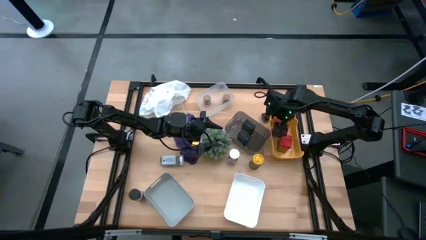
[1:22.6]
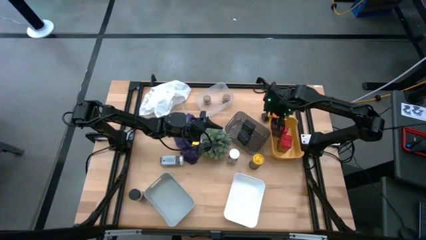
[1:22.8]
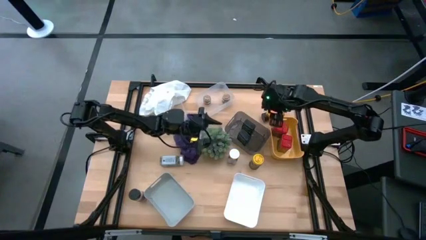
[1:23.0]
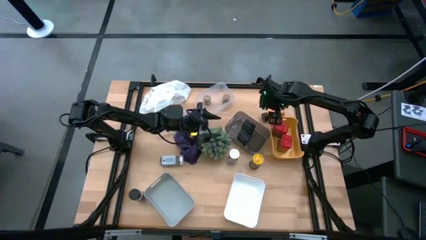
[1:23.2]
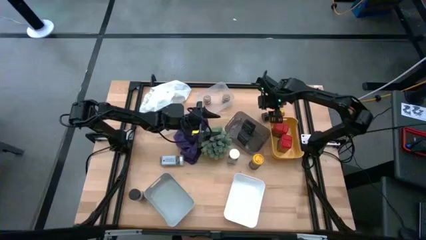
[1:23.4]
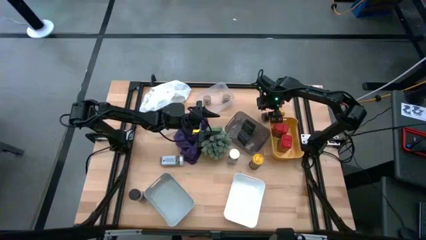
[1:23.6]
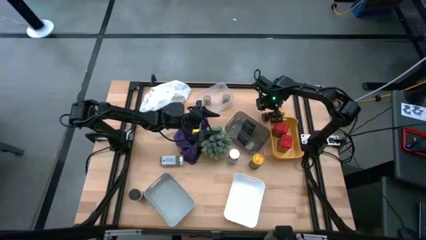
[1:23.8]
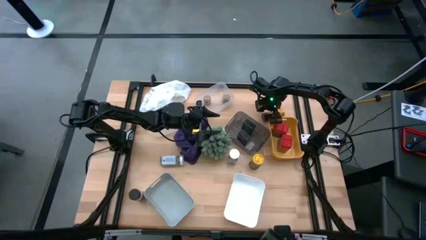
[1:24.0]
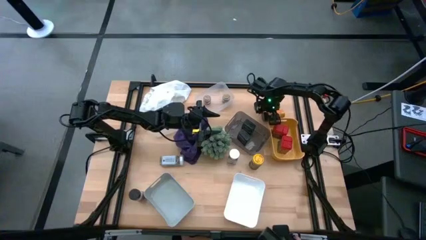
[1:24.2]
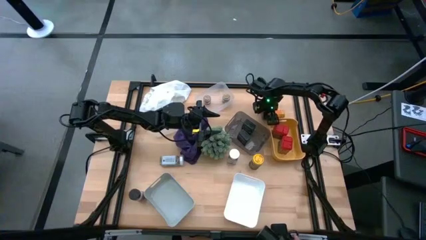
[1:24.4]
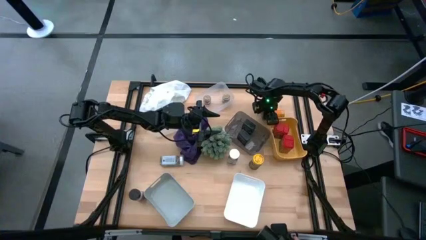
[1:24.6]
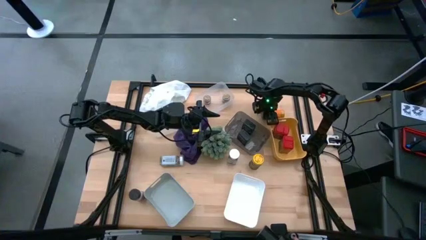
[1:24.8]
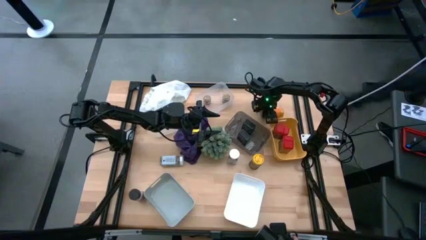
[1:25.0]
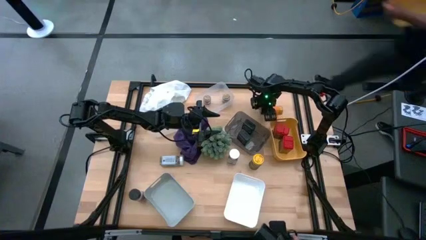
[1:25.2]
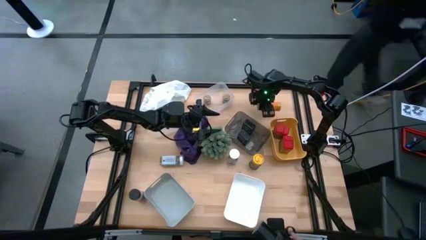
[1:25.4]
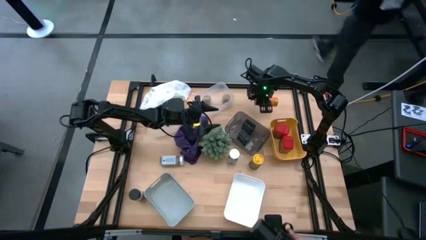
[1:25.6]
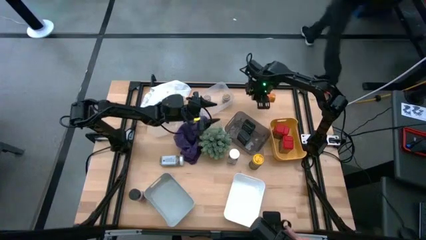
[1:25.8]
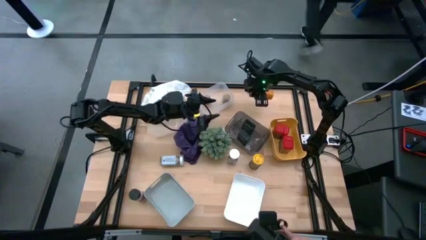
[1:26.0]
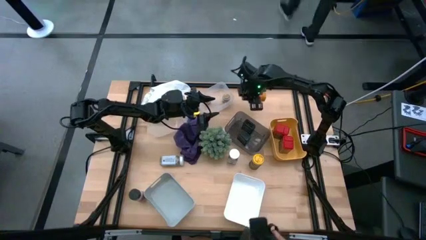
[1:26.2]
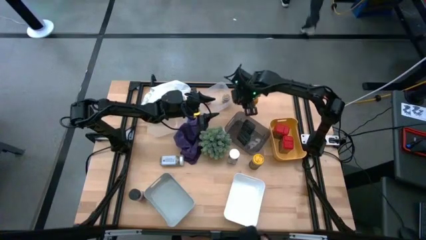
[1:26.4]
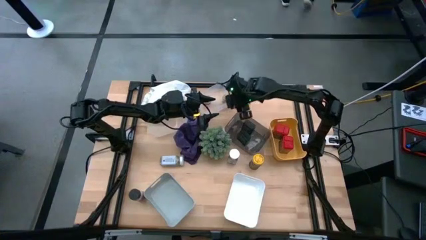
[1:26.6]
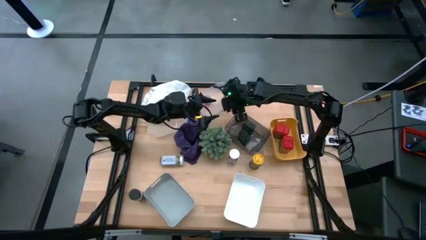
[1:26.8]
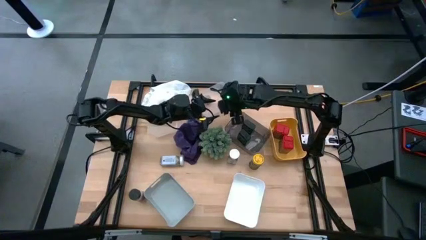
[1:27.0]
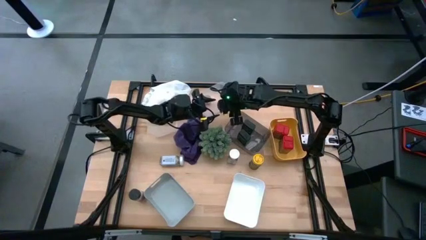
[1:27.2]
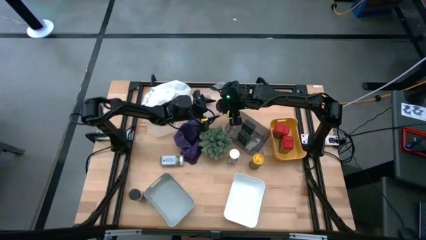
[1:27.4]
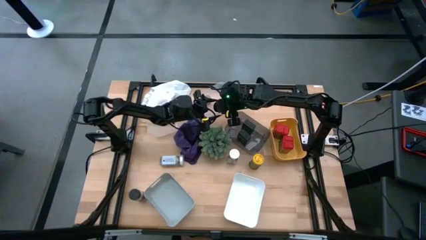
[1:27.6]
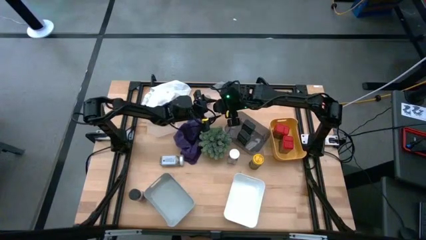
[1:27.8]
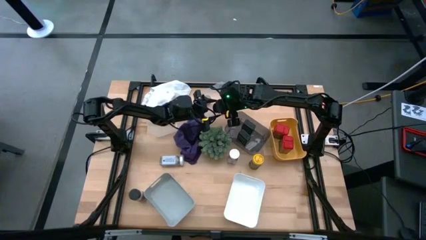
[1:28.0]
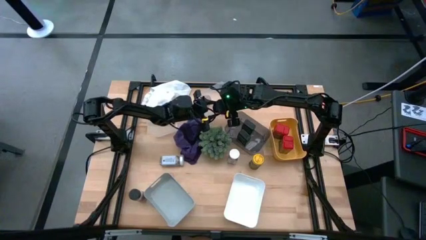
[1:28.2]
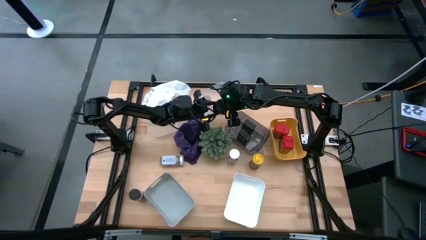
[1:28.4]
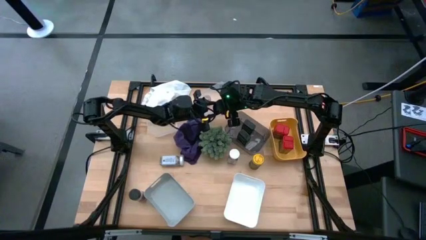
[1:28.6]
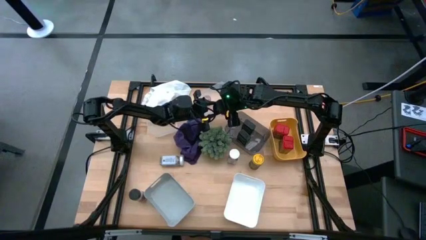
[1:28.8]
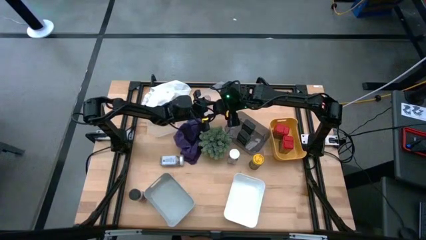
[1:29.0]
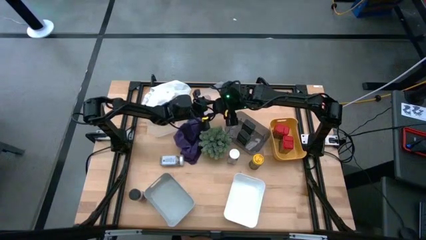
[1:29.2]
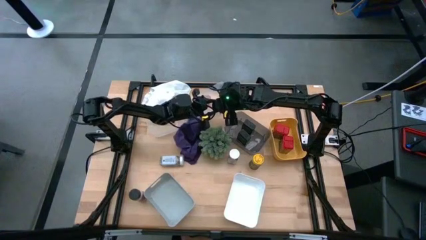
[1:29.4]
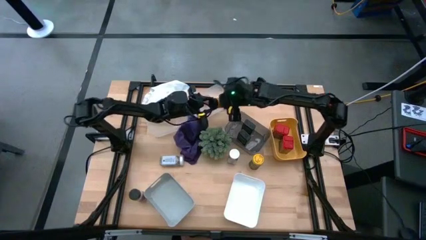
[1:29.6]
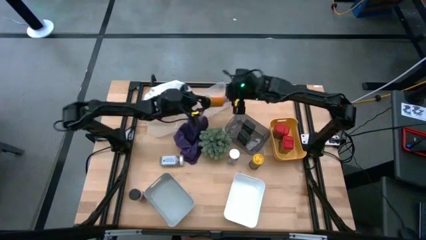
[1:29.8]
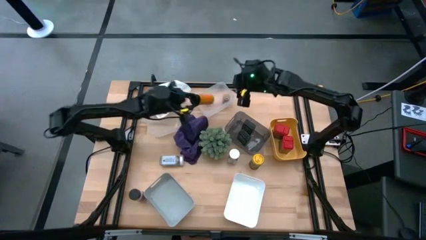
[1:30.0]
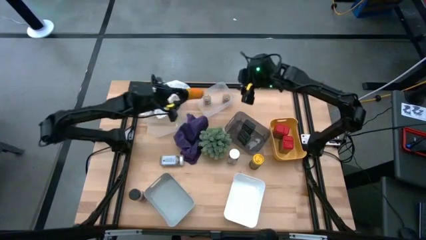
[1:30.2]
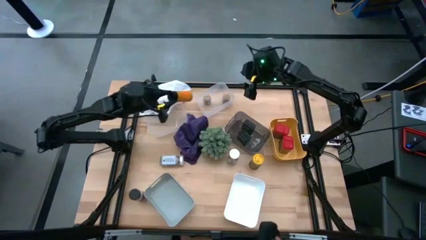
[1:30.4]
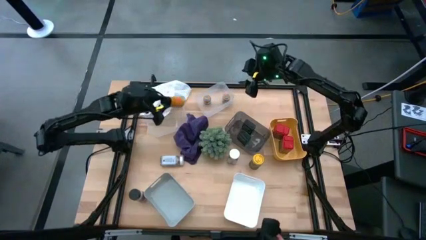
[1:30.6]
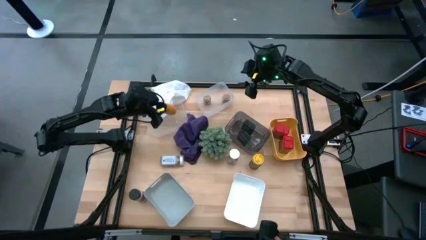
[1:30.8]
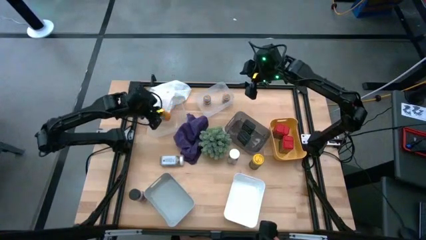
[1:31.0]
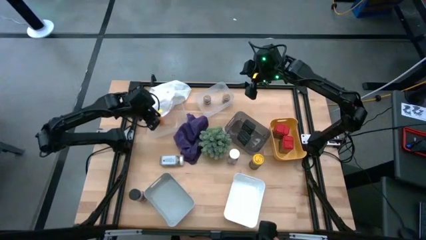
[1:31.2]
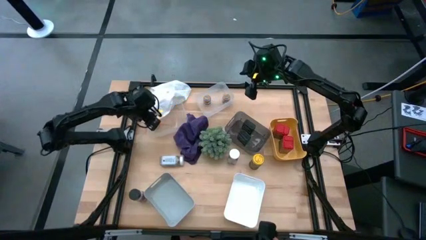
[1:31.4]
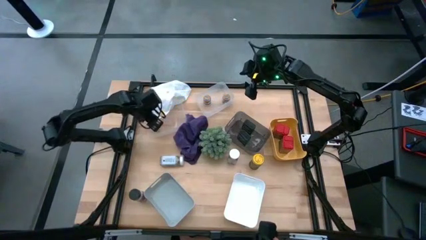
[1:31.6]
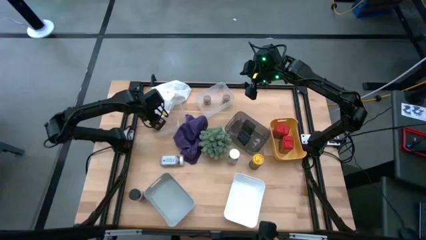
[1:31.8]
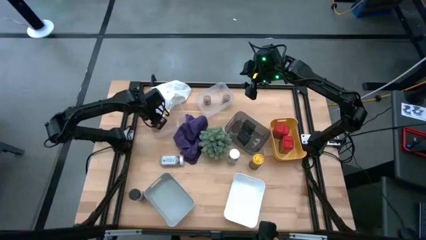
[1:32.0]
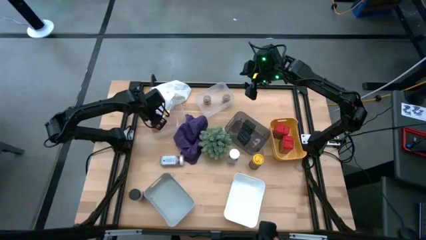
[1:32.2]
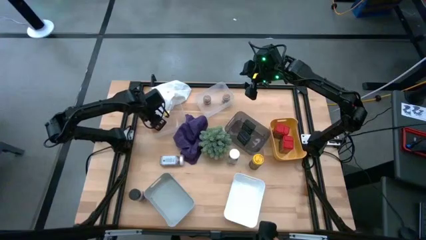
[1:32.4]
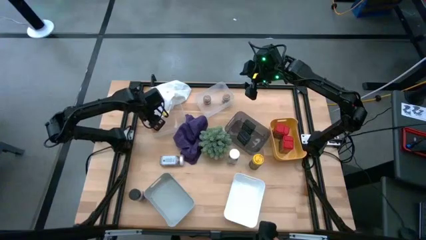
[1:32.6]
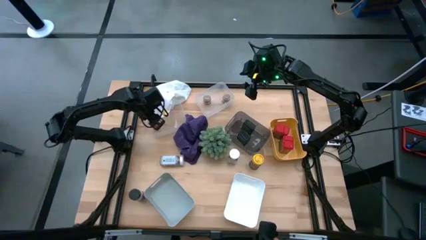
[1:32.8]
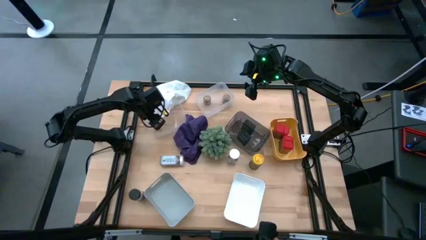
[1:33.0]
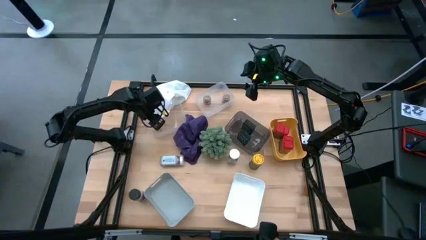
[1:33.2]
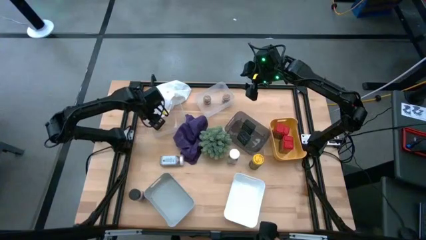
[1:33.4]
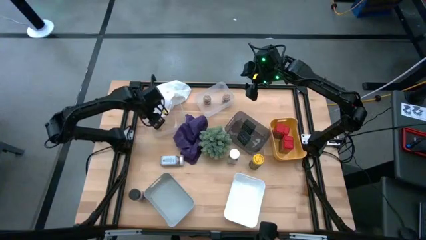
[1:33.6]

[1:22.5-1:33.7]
Task: Sort spices by type
Put the top black seasoning bottle into the left transparent bin

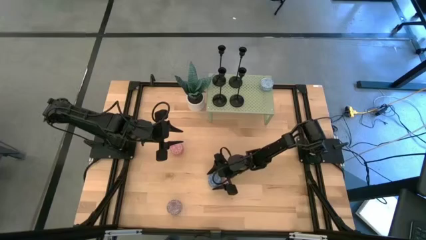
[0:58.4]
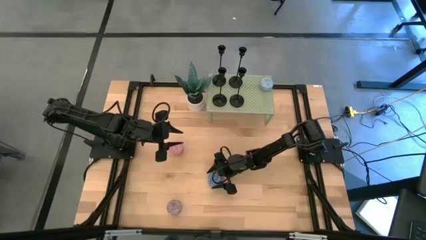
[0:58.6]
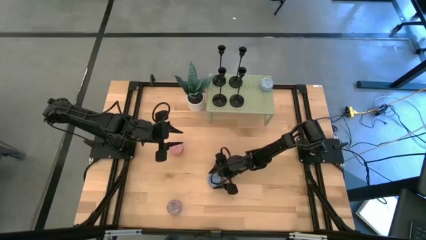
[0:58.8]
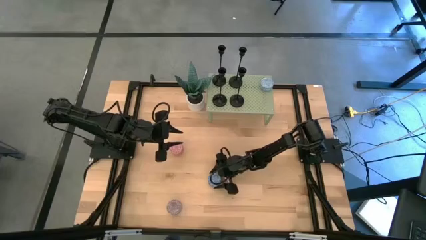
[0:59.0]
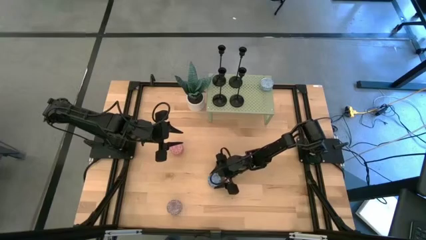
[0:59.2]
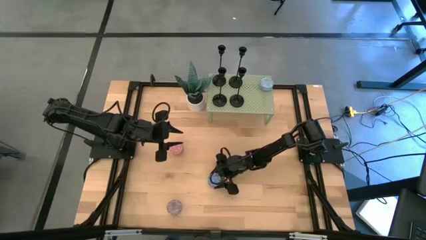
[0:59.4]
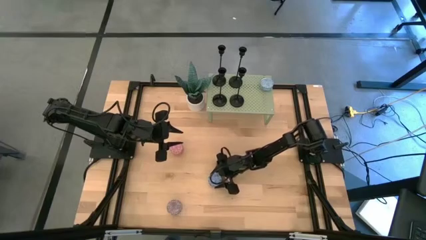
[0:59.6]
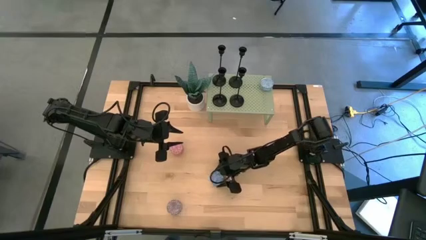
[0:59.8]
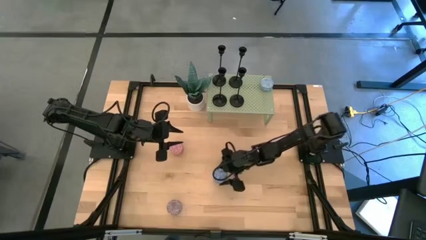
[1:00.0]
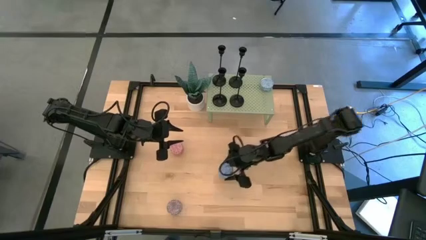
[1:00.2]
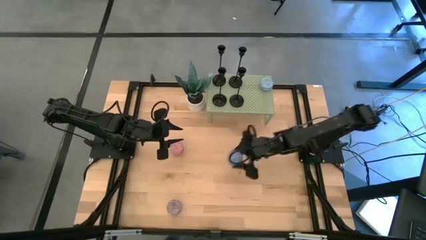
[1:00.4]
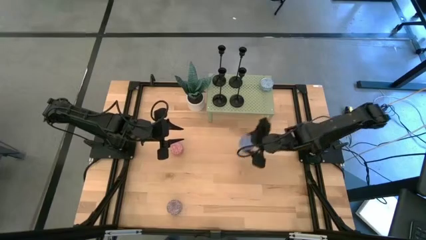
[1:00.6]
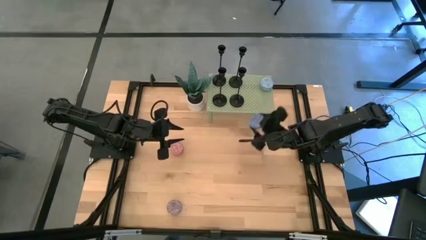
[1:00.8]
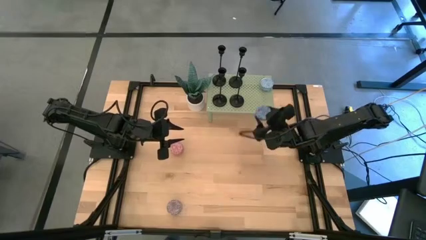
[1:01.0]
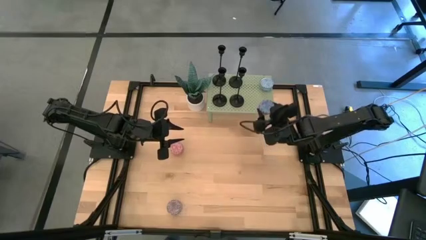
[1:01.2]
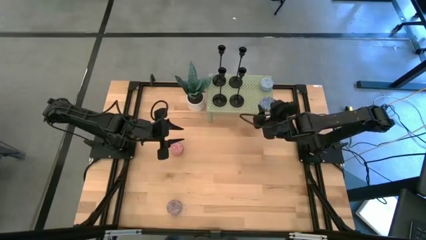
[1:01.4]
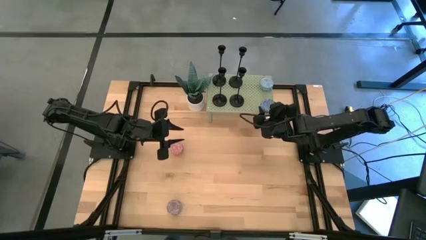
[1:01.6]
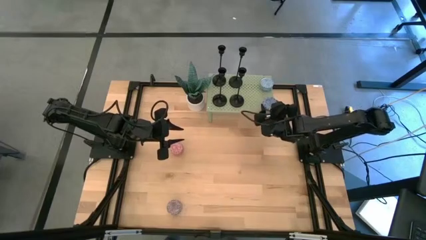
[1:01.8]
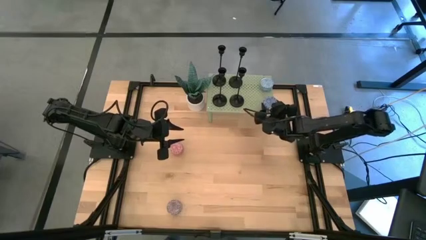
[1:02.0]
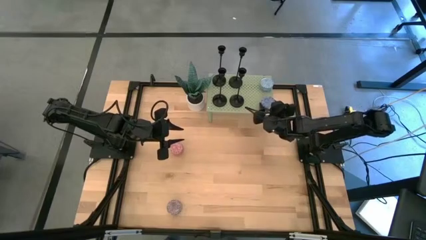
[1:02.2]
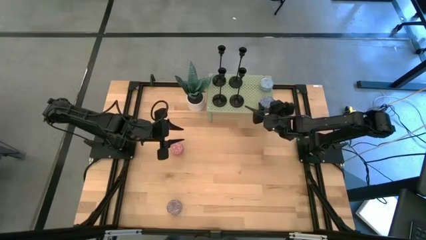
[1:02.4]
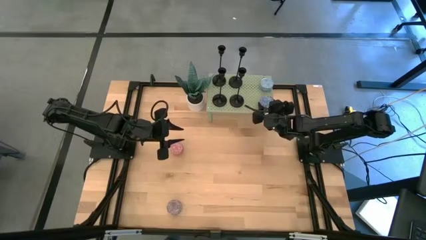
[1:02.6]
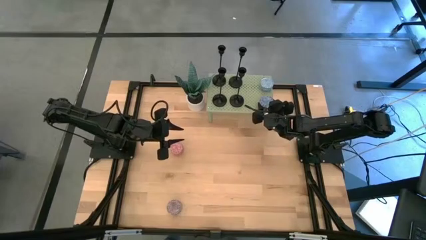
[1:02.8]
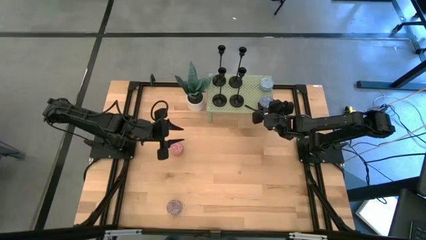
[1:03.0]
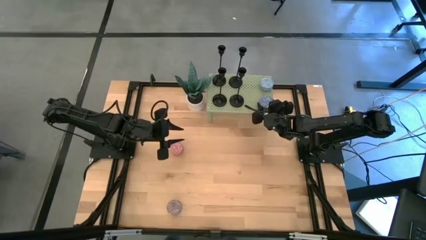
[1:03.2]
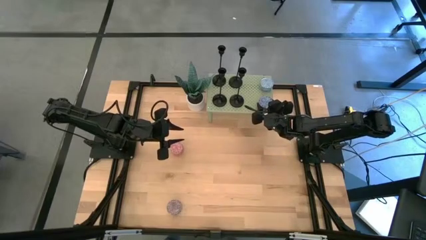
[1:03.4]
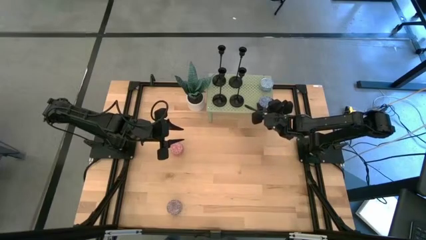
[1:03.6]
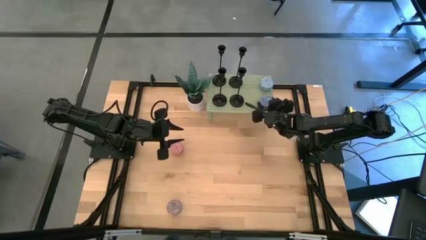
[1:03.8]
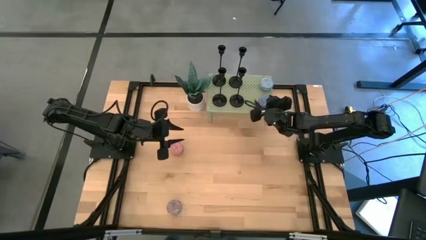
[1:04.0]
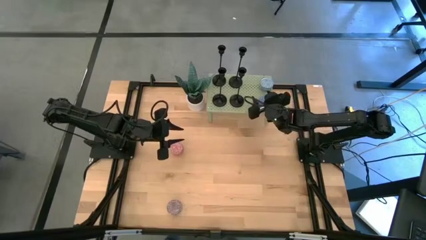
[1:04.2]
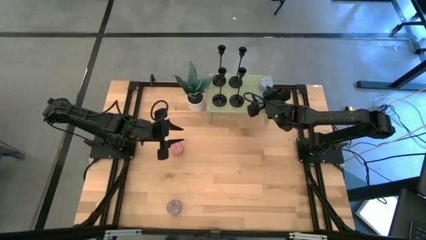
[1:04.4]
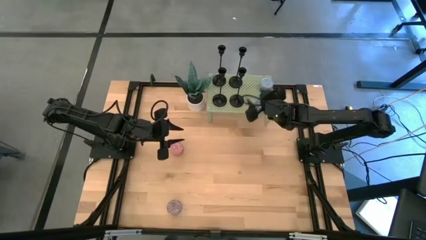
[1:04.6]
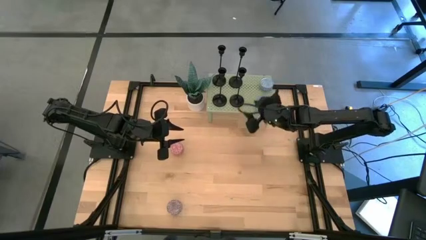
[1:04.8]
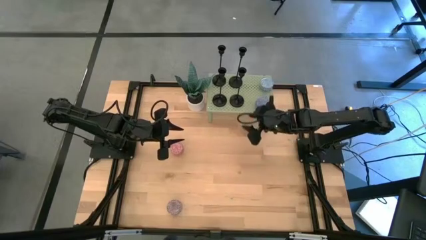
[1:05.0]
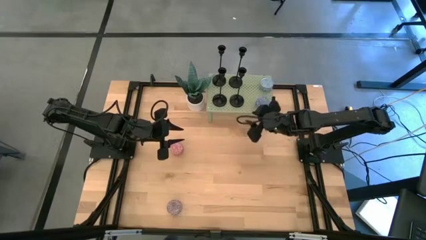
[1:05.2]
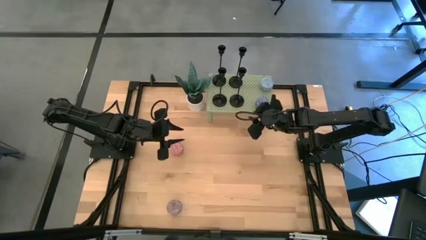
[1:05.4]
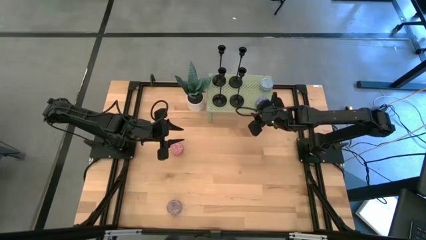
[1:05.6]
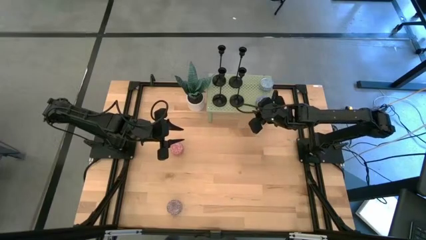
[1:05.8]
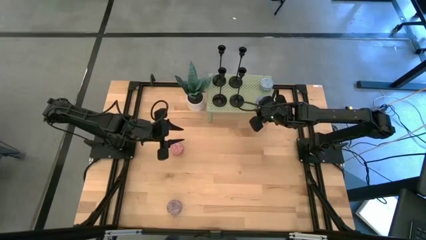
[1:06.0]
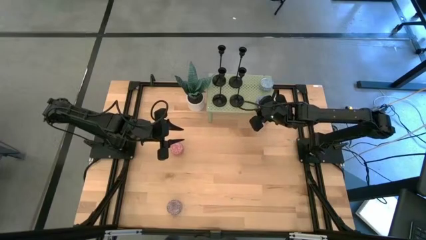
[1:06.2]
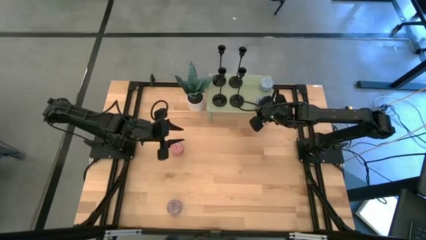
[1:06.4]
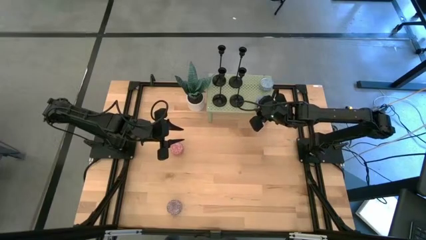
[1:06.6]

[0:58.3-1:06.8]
Task: Pick & Place candle stick holders
Align the blue scented candle with the other light blue scented candle on the shelf
